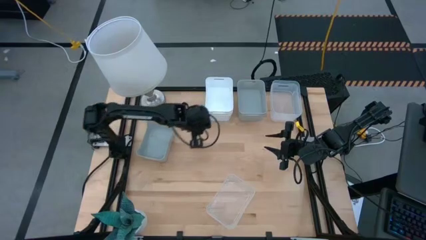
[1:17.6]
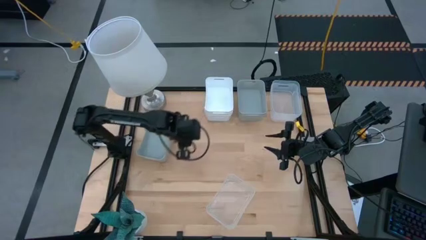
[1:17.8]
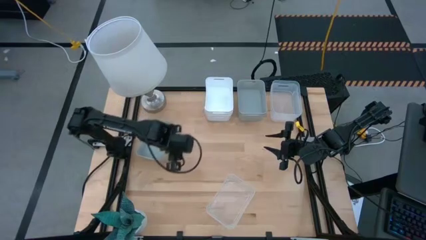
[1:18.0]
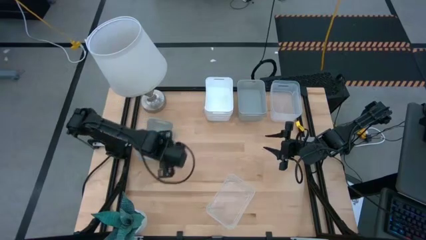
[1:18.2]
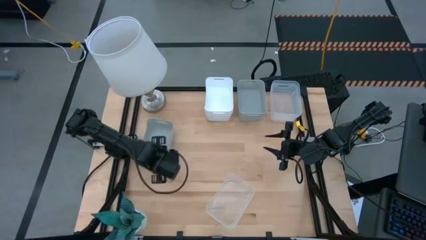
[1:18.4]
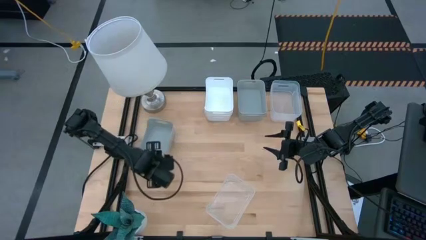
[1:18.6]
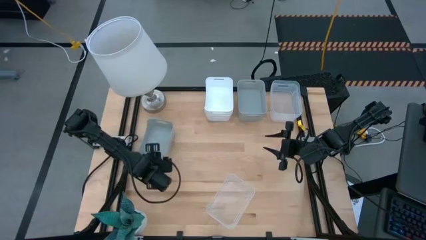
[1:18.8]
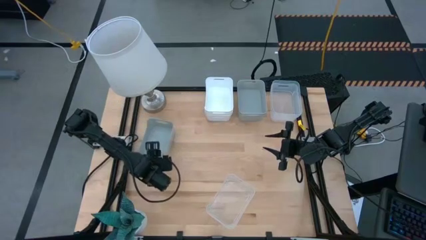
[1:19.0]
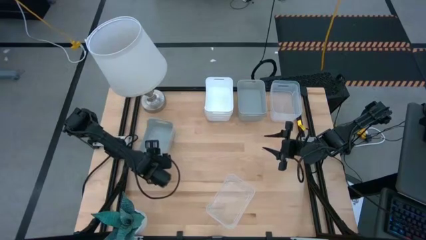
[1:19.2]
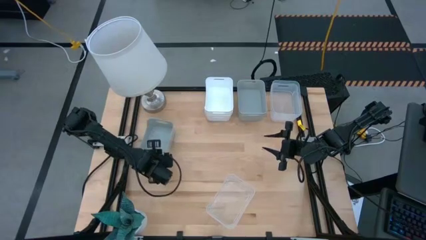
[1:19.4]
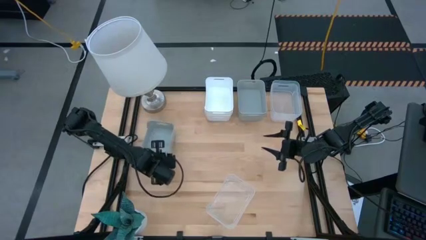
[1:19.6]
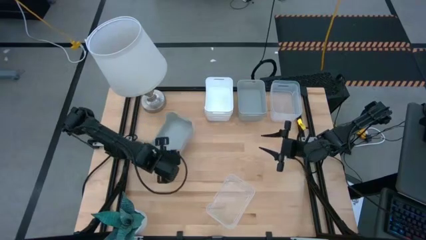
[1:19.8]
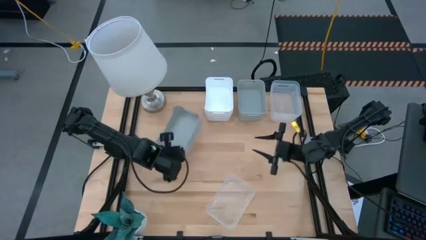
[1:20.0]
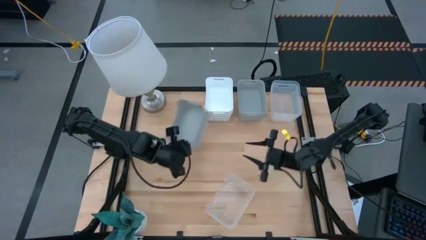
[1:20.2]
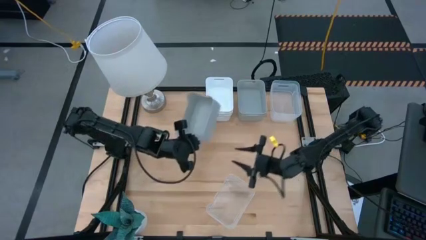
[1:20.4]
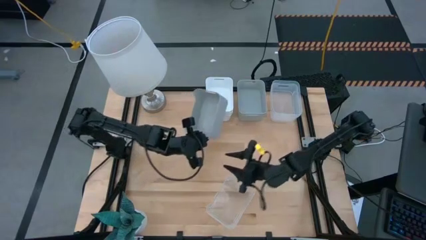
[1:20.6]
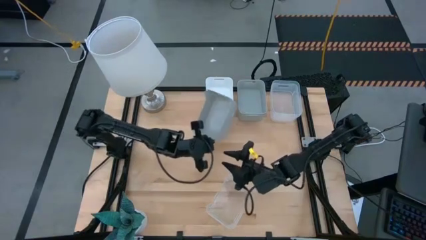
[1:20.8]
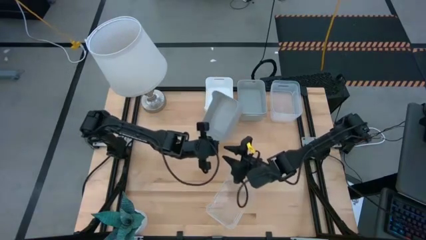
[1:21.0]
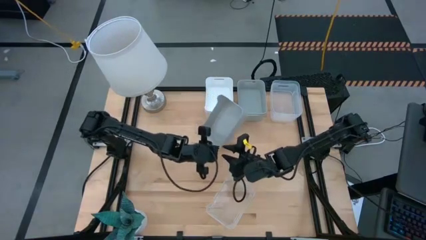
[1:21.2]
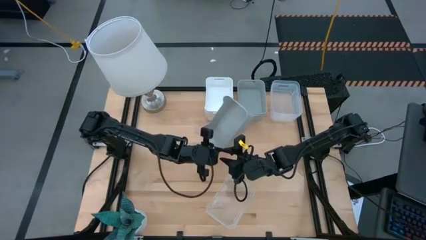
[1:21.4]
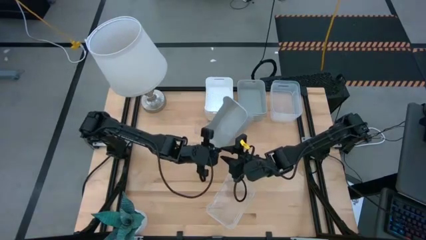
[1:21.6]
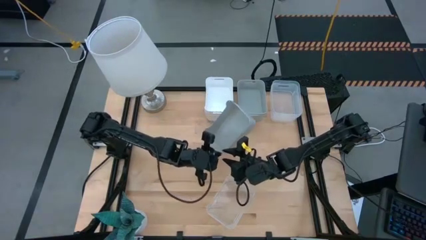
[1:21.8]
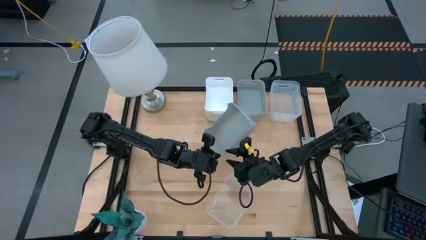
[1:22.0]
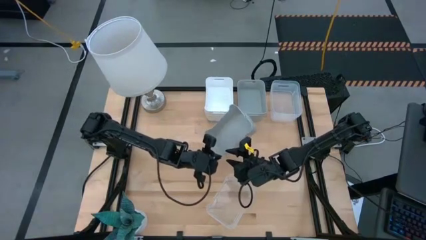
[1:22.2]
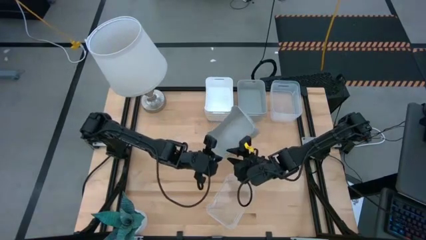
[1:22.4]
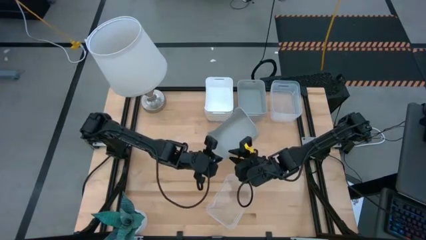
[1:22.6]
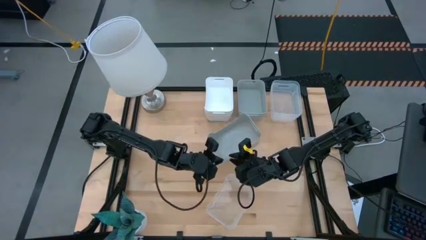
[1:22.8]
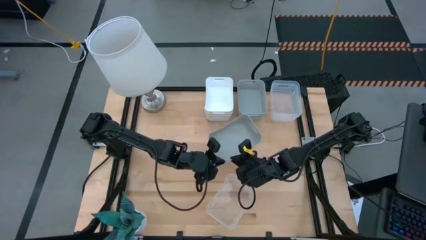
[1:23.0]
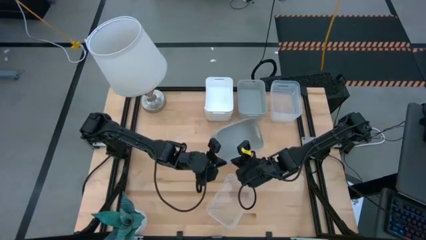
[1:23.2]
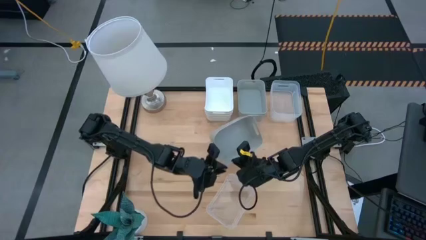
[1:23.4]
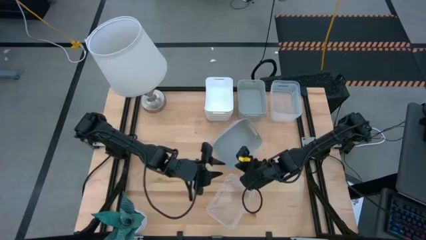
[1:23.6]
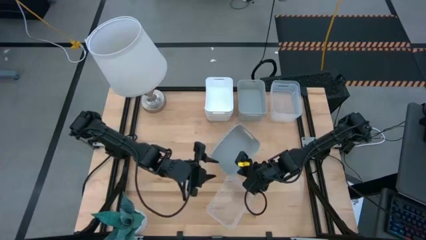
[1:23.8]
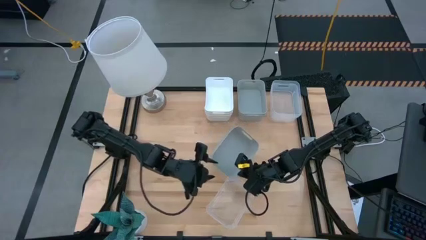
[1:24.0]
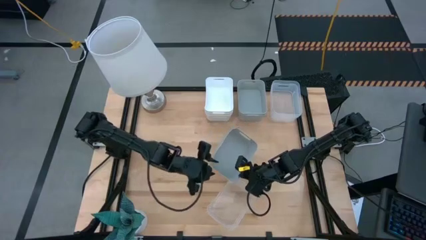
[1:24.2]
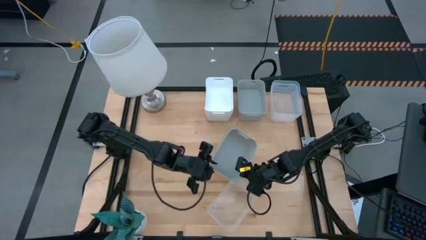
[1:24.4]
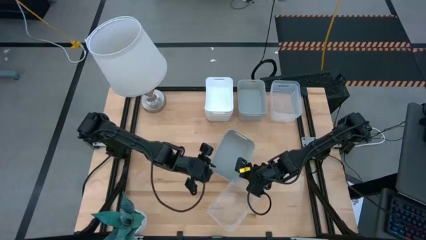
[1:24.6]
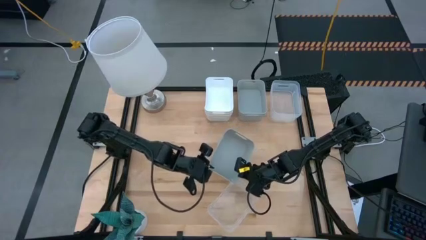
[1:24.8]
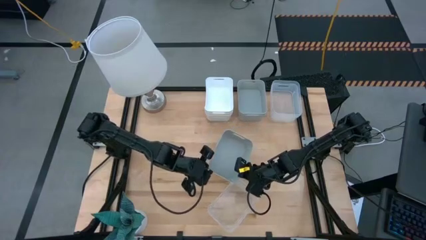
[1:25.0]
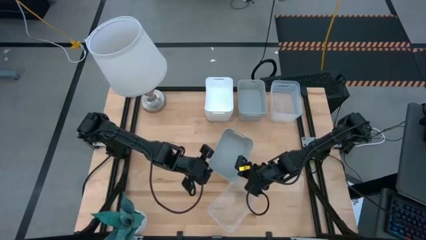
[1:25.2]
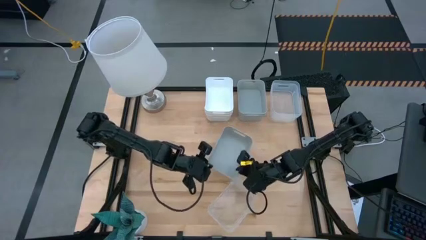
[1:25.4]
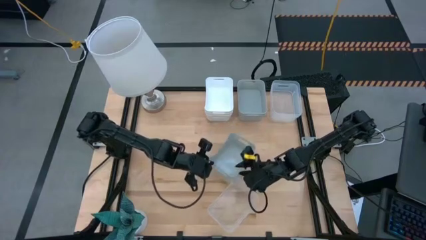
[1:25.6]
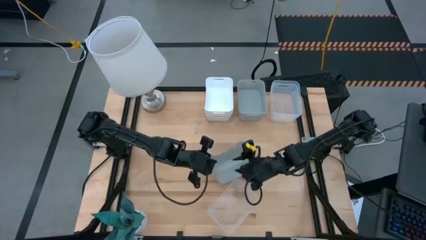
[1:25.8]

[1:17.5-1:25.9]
Stack the bottom gray bin on top of the top gray bin

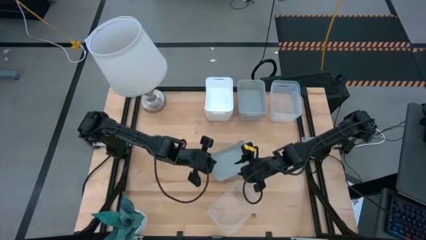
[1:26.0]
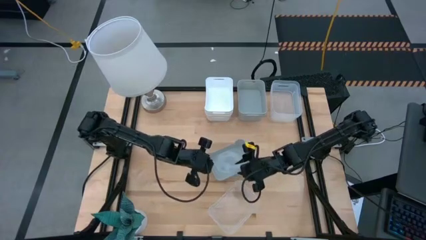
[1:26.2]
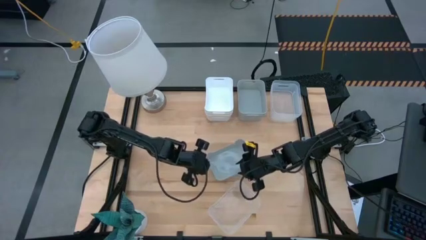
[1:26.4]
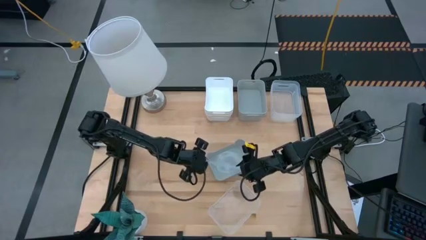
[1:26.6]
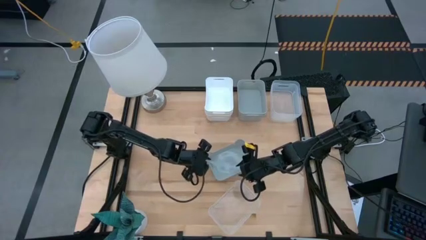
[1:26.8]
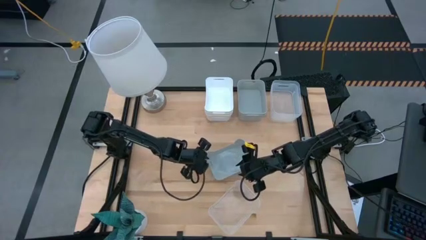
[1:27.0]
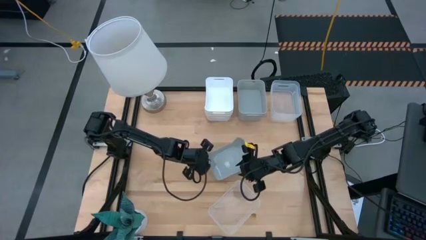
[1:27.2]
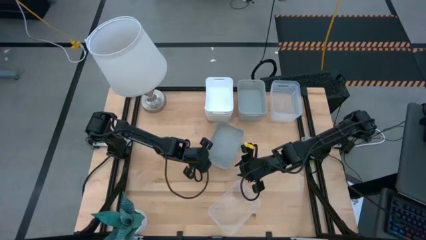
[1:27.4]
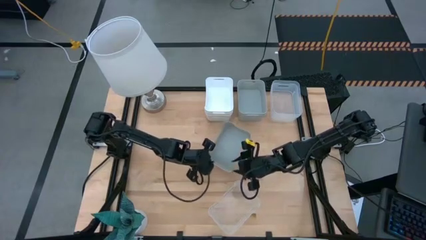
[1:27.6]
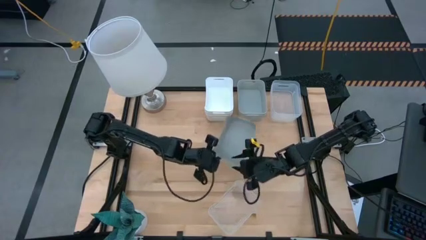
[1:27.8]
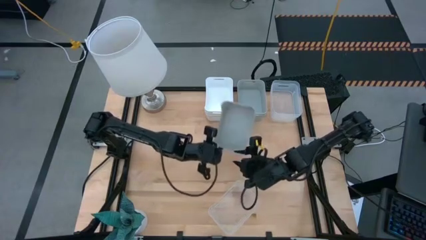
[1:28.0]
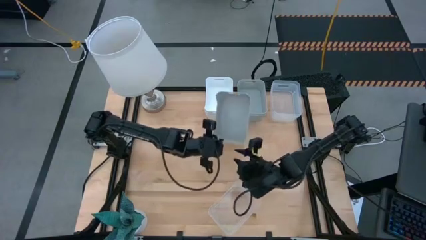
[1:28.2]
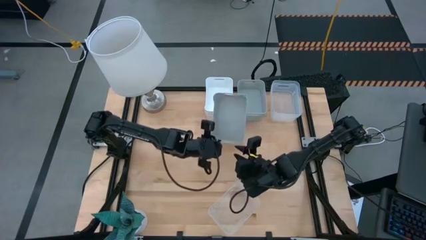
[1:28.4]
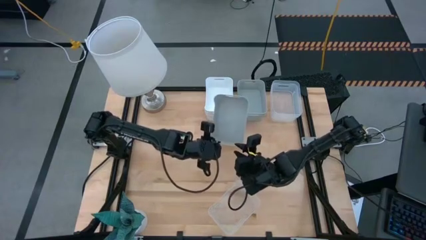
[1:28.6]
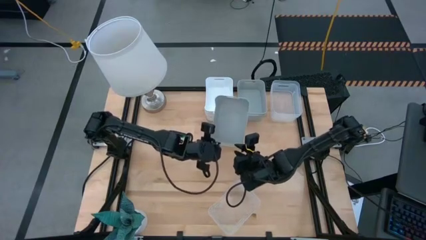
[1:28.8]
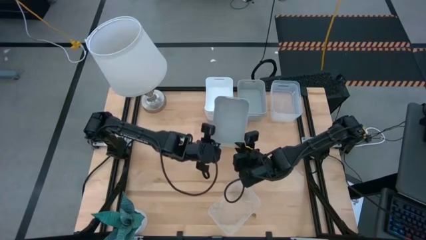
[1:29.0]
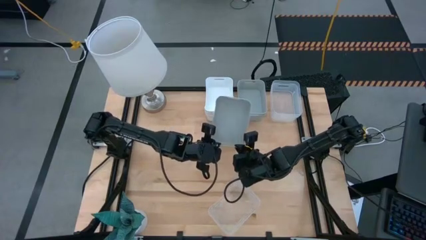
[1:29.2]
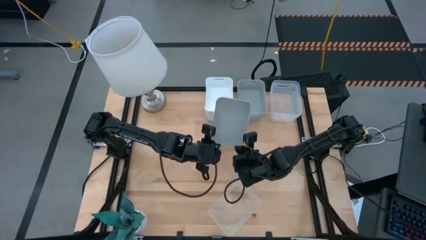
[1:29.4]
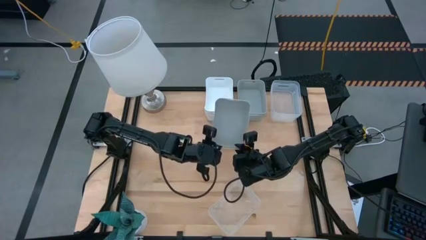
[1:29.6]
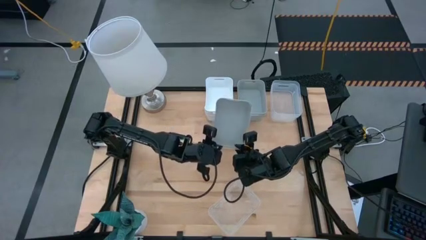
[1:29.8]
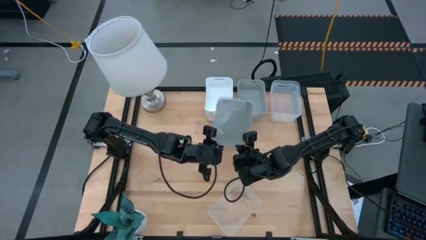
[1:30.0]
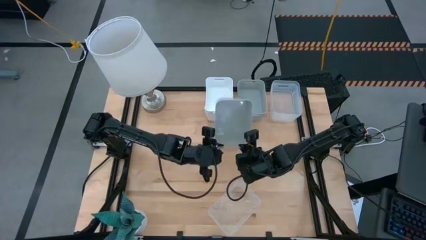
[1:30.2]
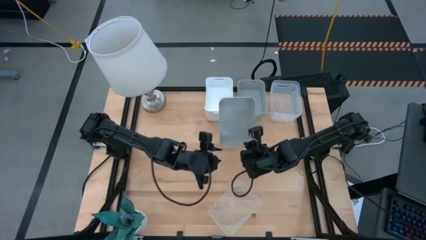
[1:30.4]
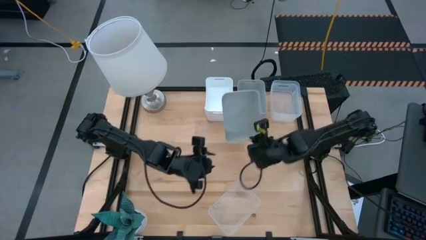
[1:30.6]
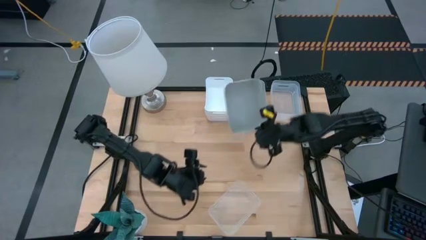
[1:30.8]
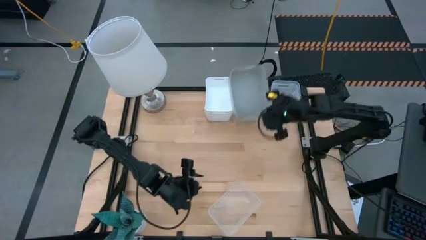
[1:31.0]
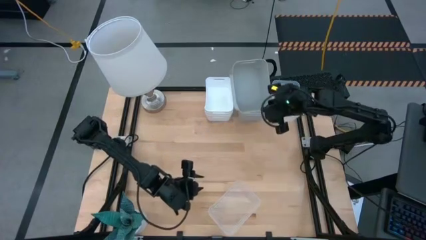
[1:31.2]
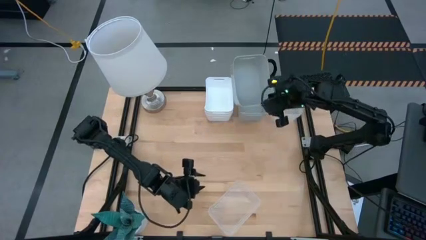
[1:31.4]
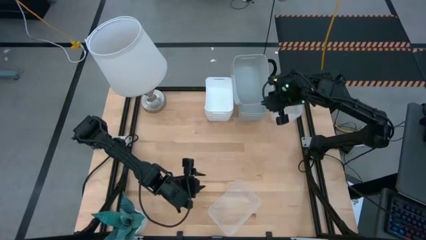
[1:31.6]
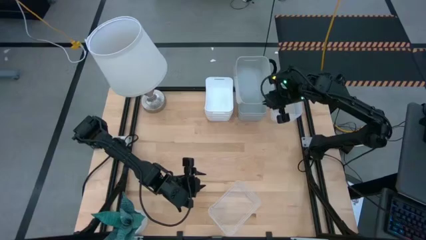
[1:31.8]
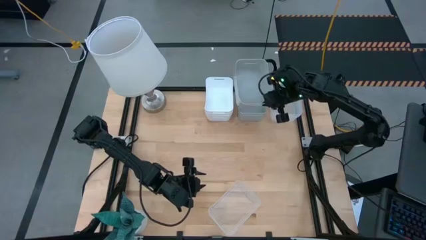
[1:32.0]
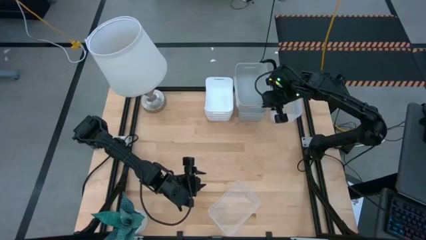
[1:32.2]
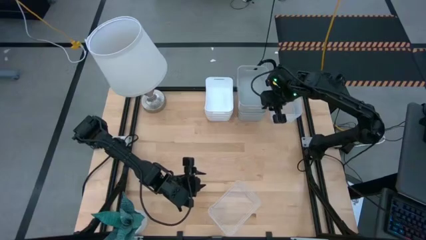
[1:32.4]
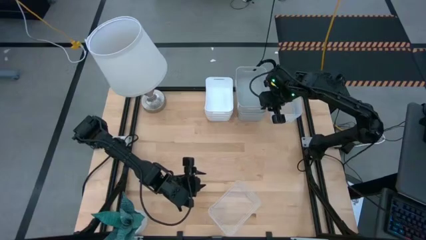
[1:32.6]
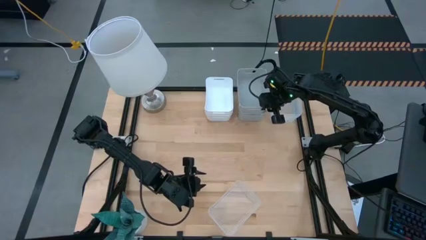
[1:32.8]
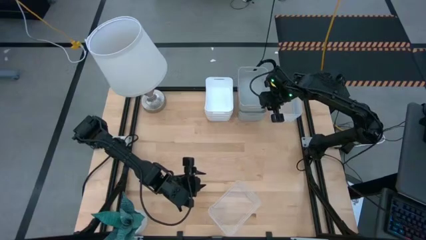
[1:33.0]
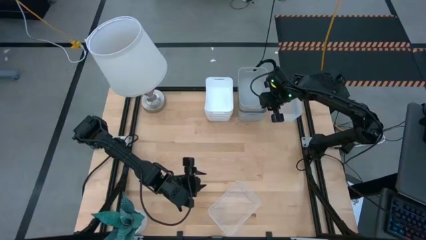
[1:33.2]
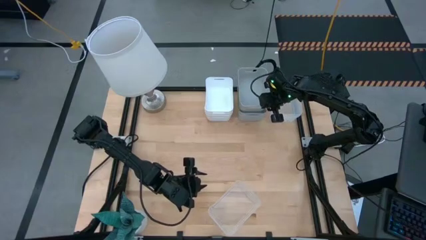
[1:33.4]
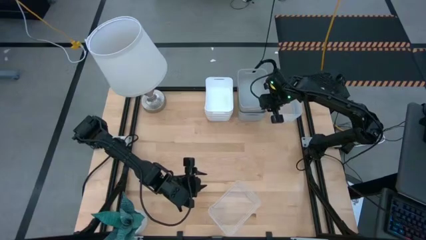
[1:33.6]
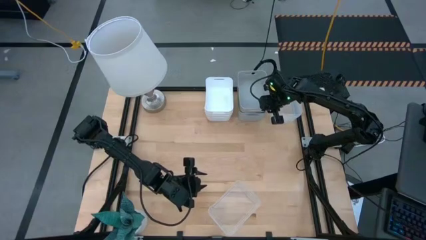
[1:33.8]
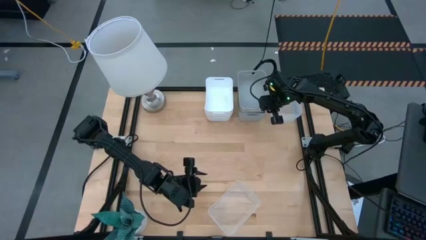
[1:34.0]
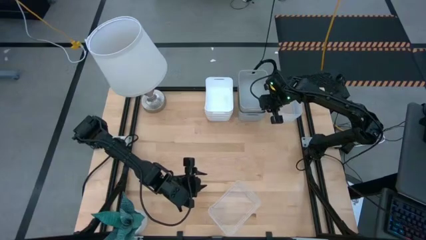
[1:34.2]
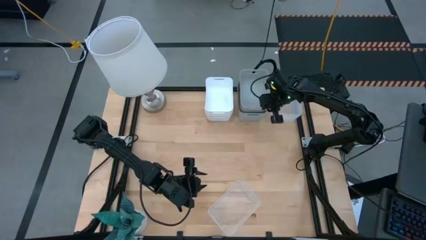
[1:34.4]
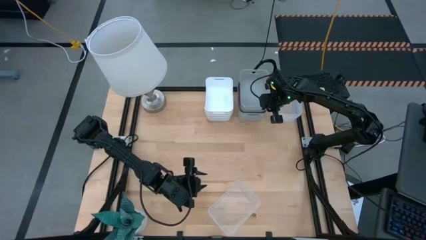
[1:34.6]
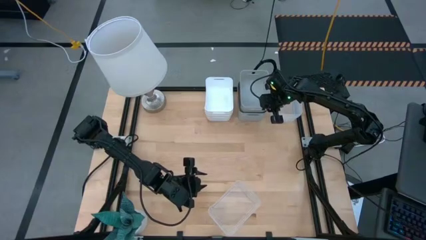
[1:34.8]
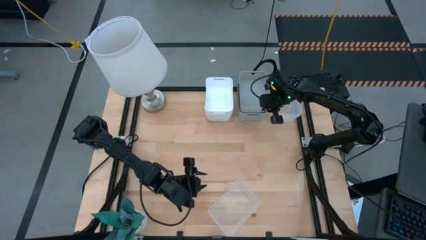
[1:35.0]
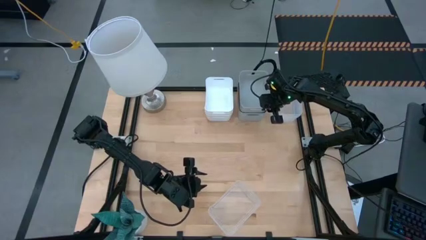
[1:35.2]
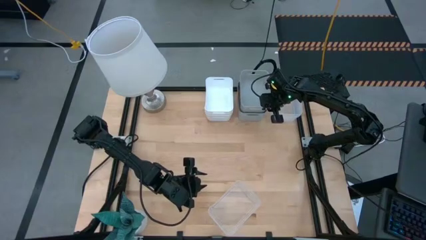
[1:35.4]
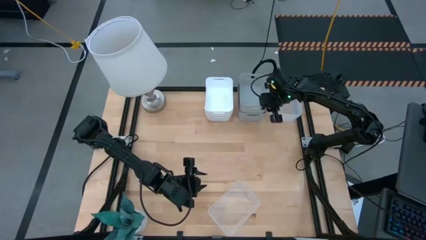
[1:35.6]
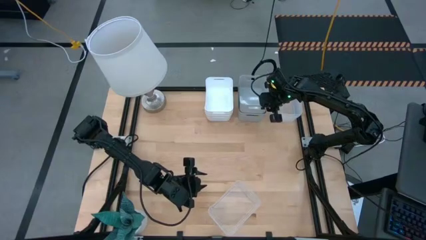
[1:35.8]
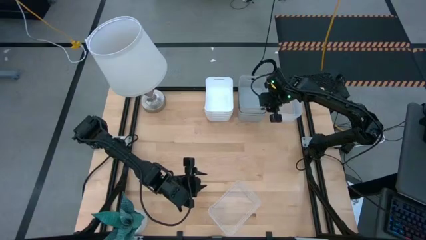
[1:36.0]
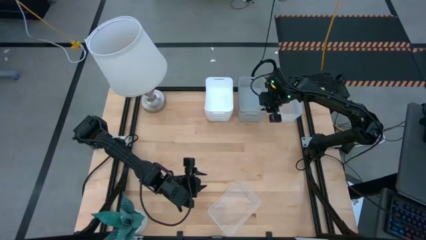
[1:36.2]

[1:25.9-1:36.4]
Stack the bottom gray bin on top of the top gray bin
